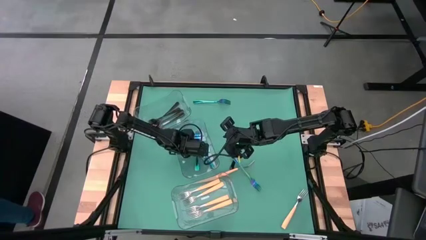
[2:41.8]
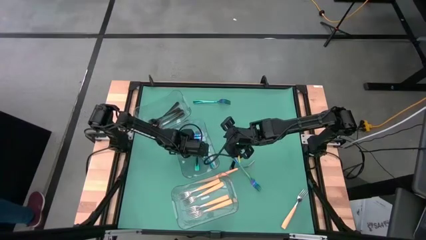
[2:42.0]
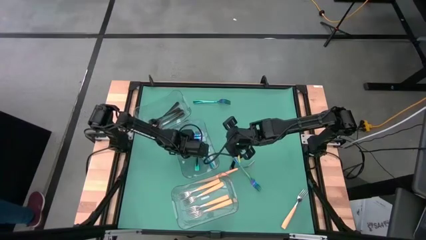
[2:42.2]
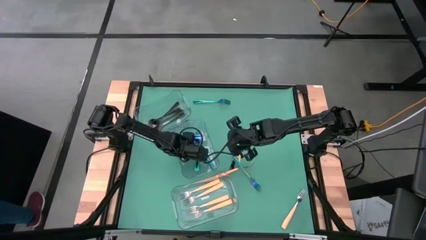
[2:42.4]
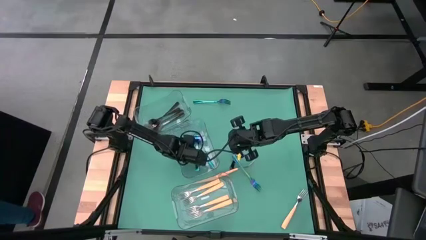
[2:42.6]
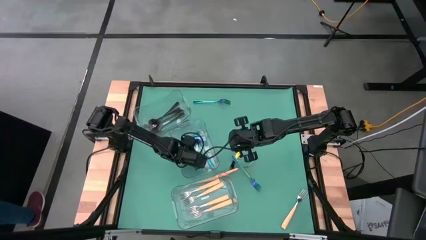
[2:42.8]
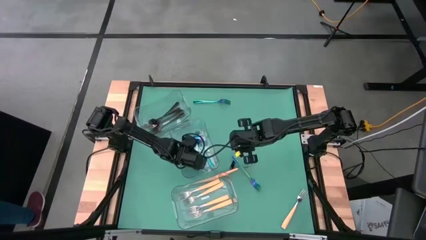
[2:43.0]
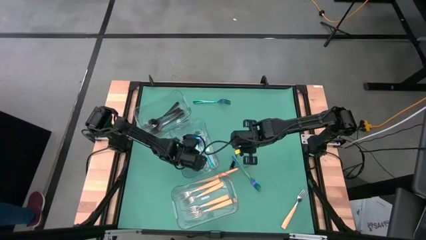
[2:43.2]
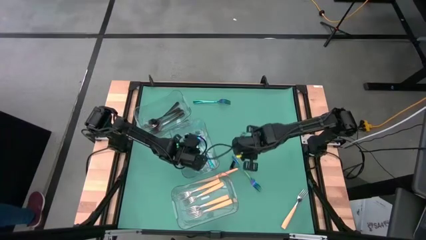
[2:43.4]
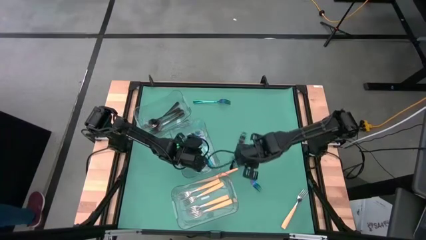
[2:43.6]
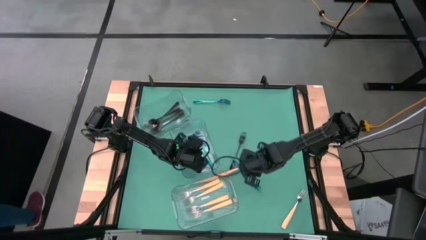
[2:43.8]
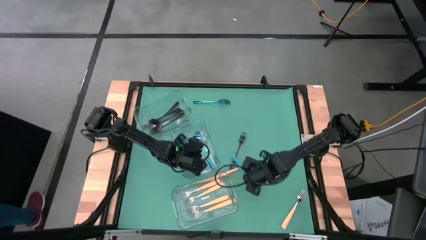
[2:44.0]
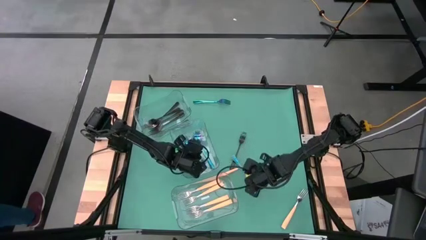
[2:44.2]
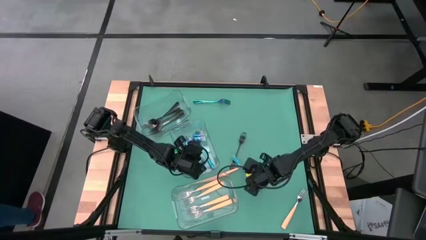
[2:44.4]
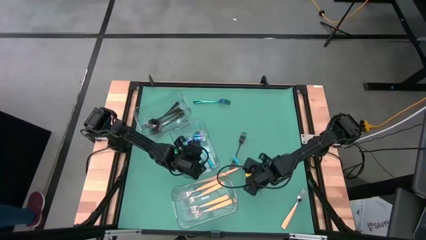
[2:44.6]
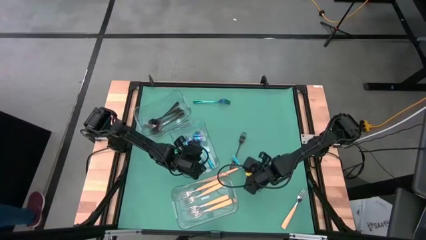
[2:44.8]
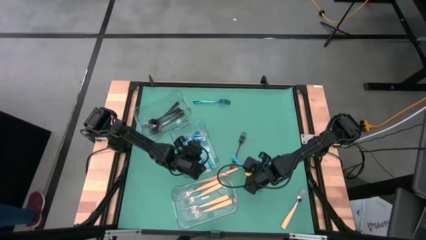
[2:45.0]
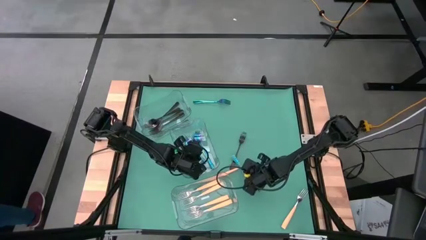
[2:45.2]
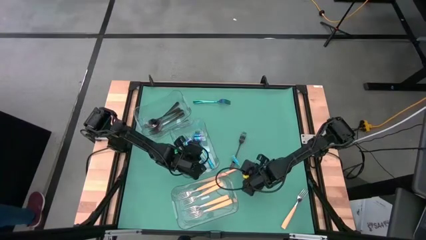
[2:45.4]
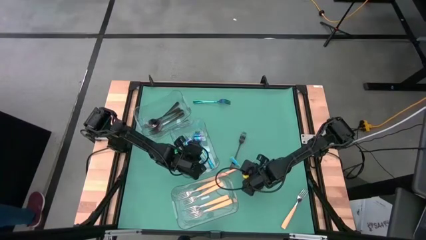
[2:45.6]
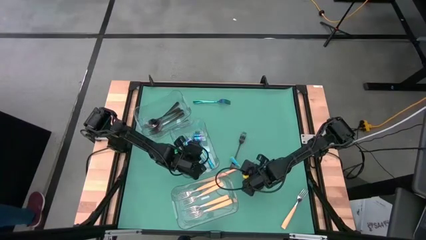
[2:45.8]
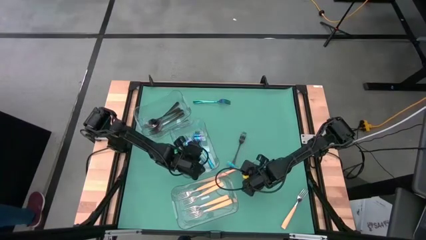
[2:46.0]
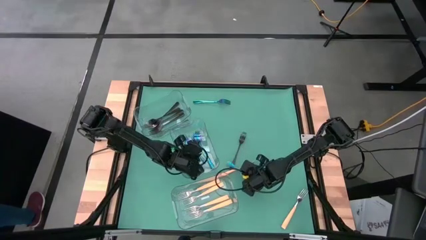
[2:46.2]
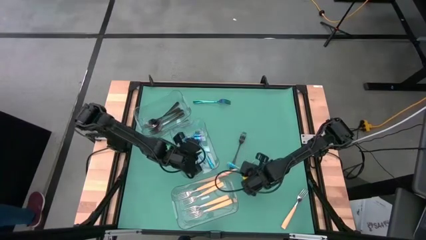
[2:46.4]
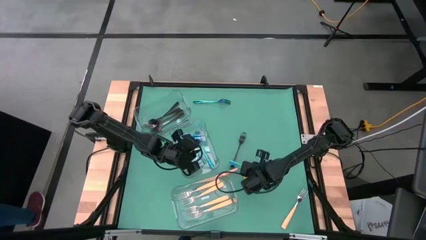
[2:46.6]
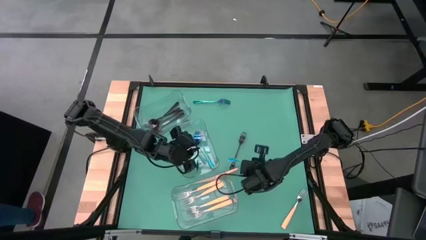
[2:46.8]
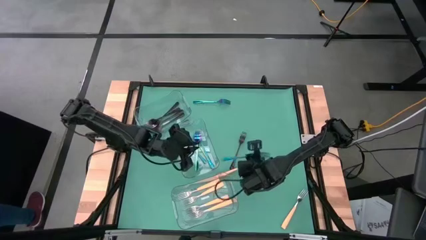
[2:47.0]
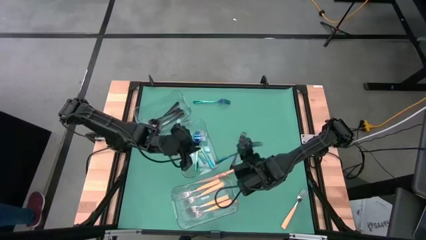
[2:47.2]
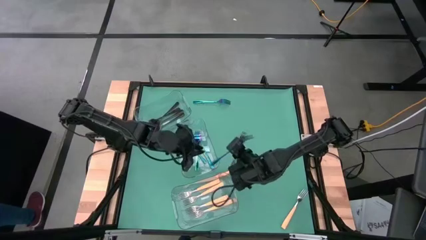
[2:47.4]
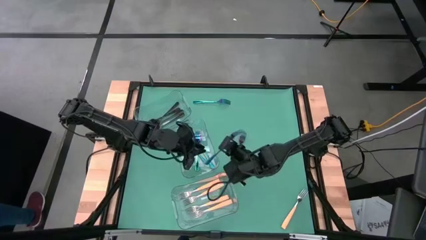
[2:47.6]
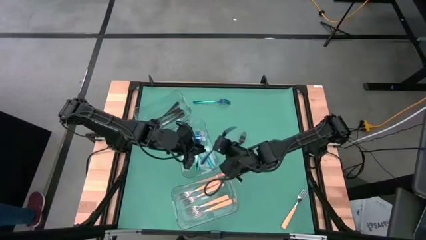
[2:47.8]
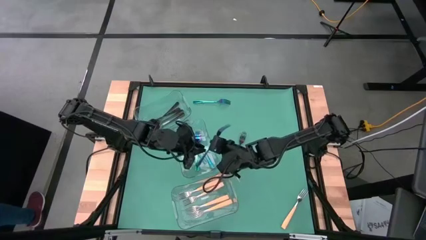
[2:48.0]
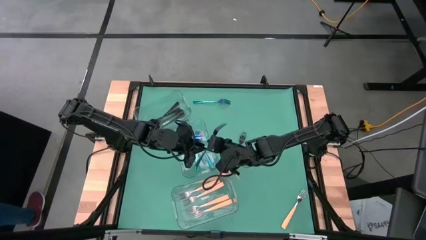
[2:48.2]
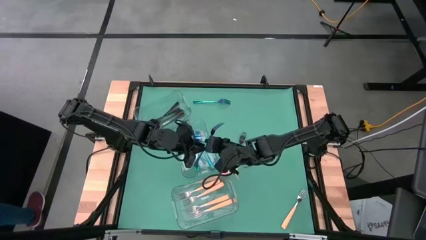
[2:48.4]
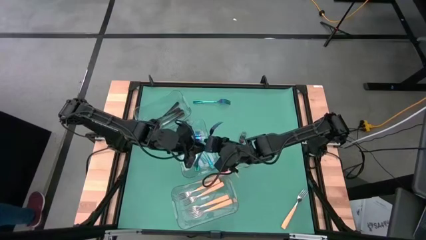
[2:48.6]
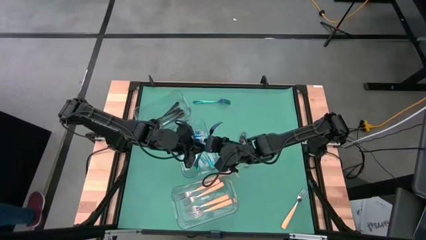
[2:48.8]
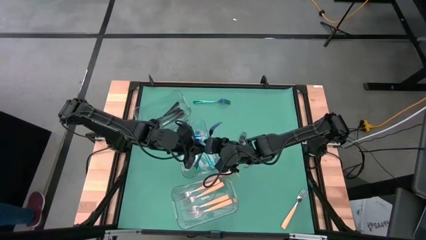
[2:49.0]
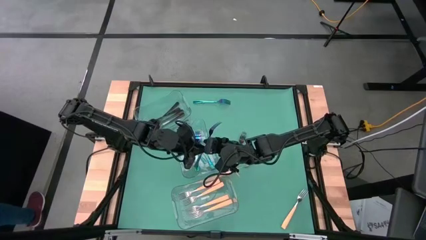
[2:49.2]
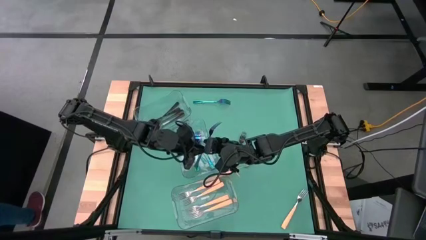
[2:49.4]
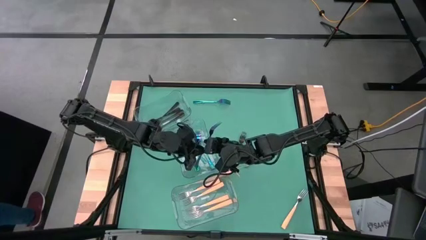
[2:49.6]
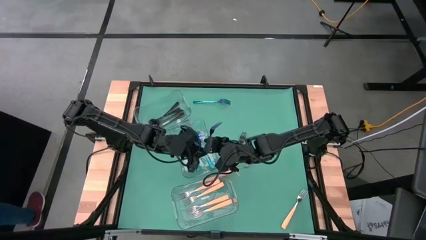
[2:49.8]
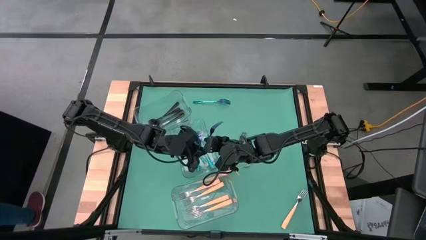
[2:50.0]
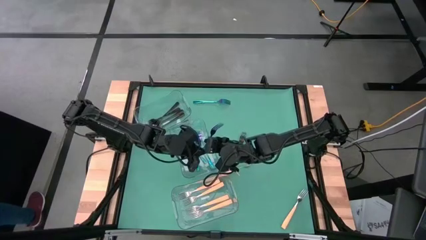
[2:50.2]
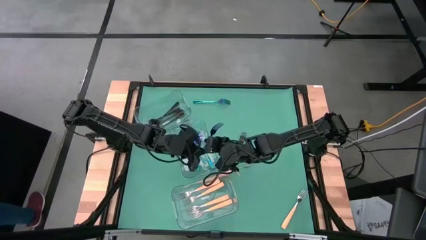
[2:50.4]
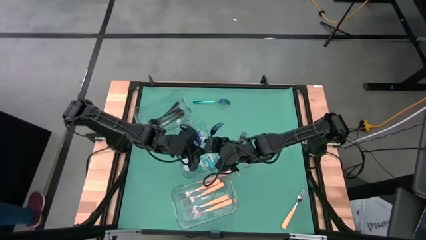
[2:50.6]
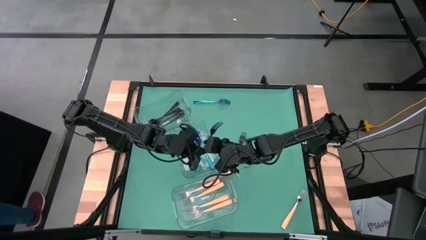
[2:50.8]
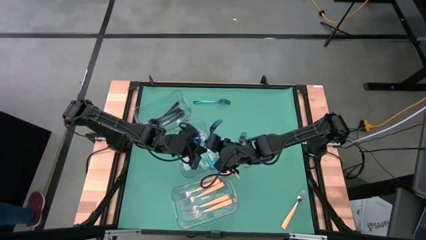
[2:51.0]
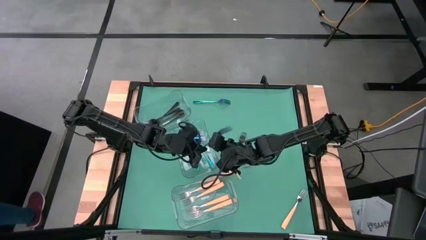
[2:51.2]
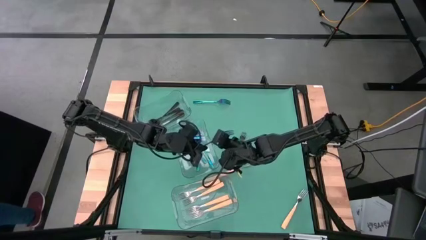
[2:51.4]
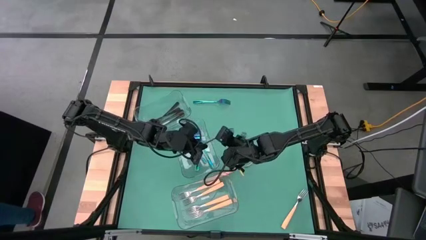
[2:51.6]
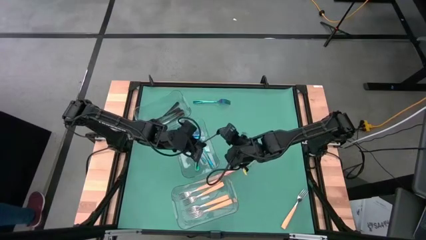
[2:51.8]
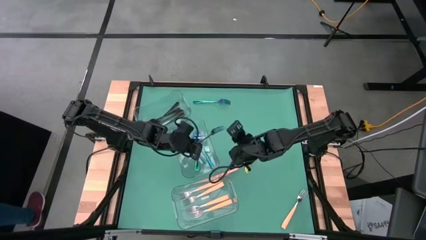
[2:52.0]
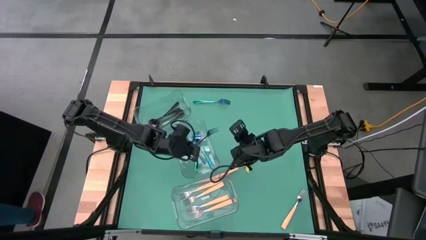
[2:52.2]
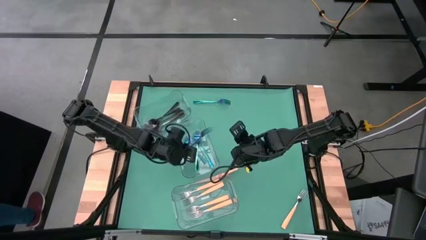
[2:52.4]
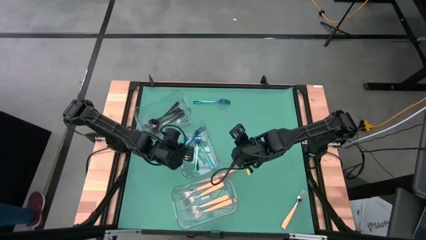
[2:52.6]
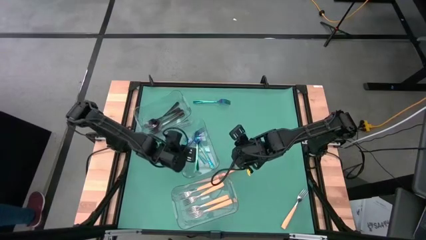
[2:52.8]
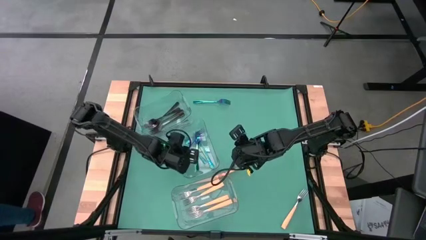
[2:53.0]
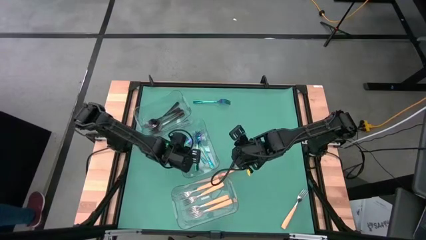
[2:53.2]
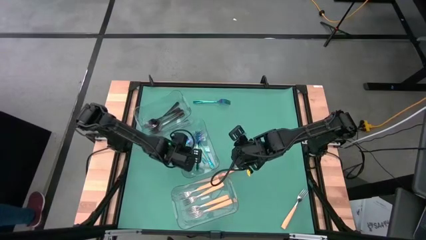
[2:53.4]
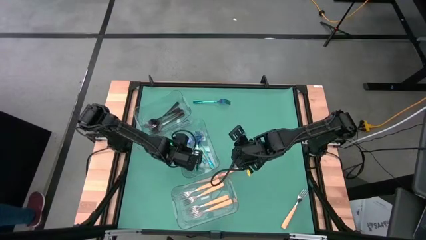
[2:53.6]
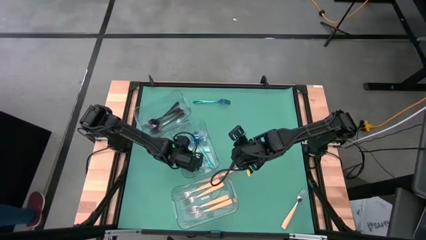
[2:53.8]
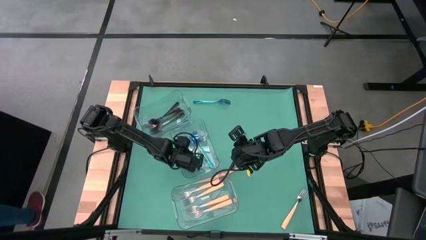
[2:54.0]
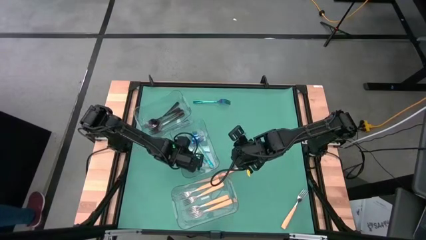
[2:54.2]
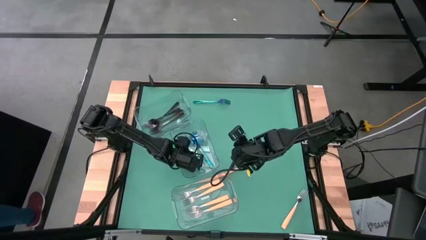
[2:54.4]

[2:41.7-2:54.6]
Task: Sort silverware by color (type)
Put the blue fork into the center transparent bin

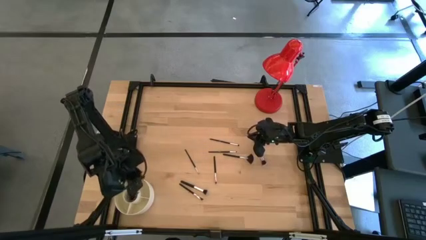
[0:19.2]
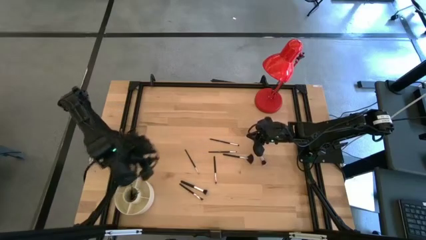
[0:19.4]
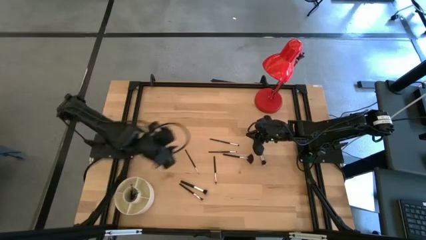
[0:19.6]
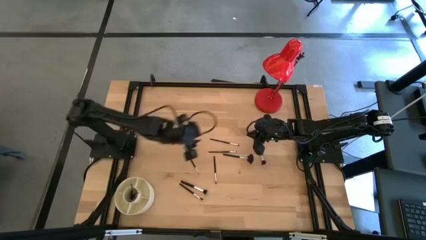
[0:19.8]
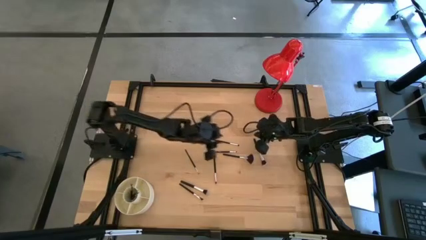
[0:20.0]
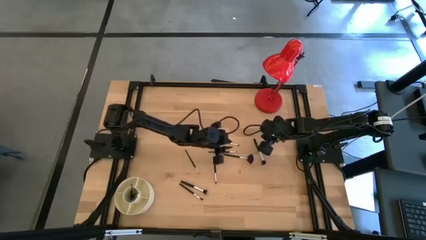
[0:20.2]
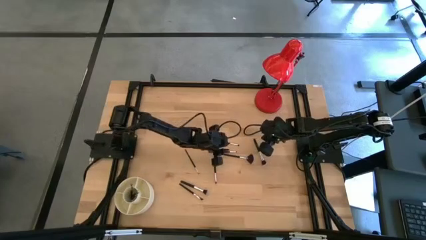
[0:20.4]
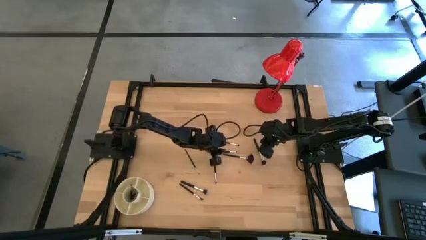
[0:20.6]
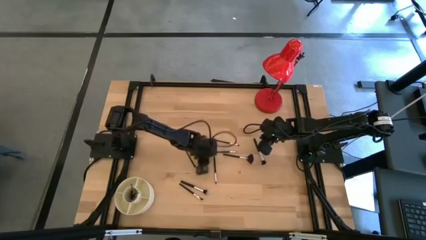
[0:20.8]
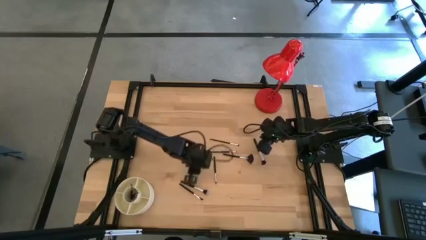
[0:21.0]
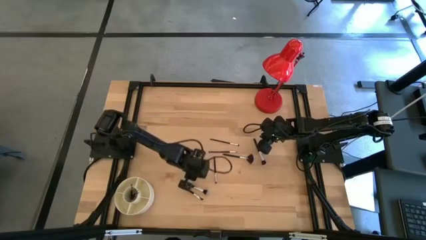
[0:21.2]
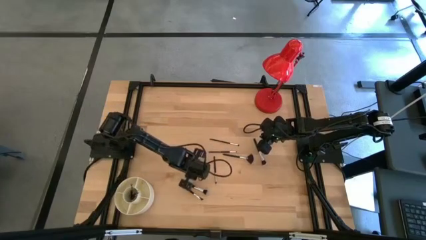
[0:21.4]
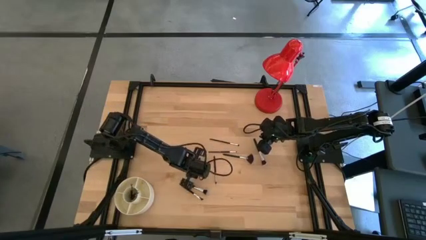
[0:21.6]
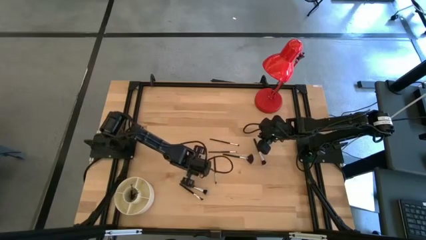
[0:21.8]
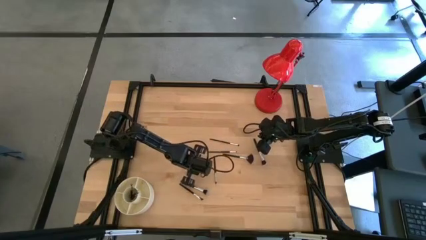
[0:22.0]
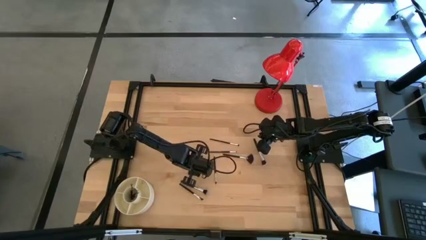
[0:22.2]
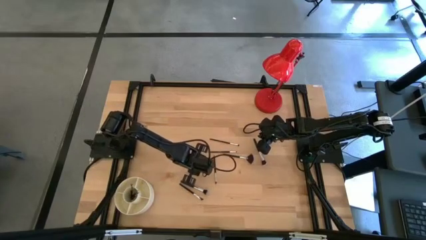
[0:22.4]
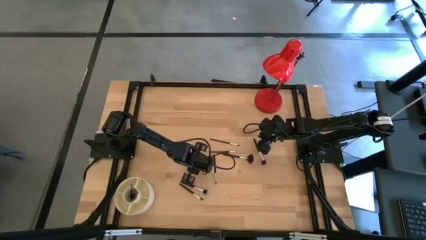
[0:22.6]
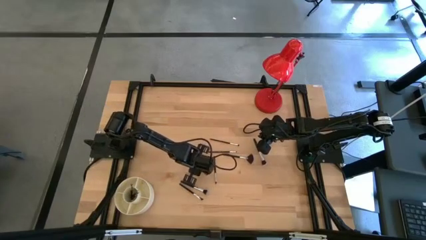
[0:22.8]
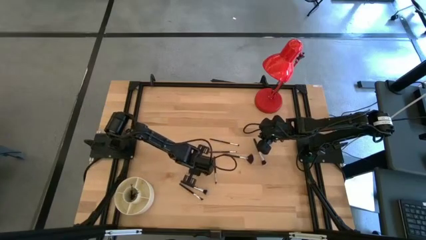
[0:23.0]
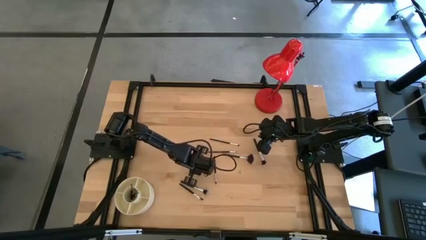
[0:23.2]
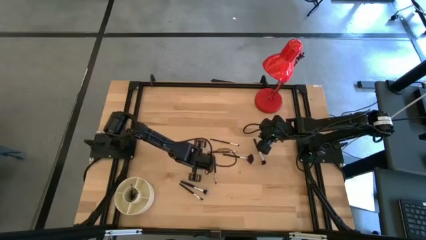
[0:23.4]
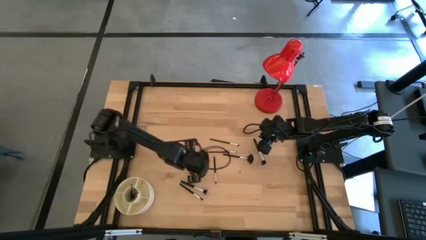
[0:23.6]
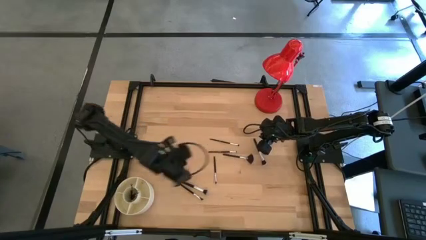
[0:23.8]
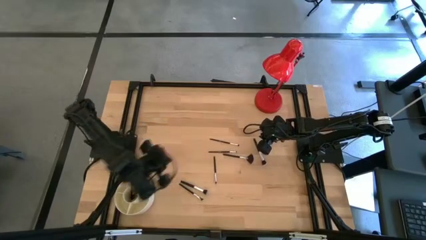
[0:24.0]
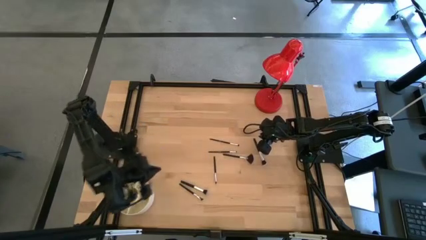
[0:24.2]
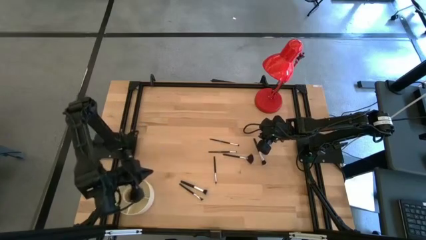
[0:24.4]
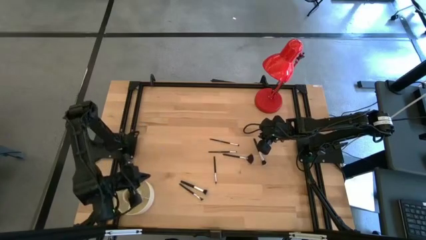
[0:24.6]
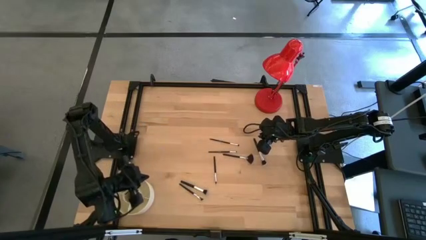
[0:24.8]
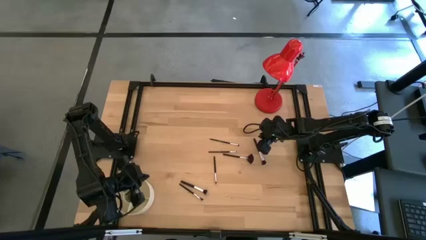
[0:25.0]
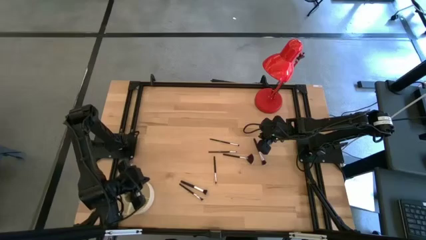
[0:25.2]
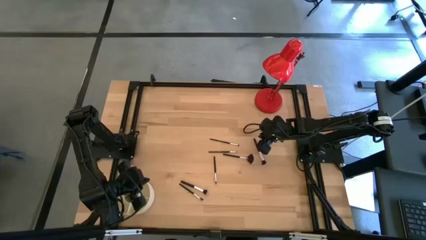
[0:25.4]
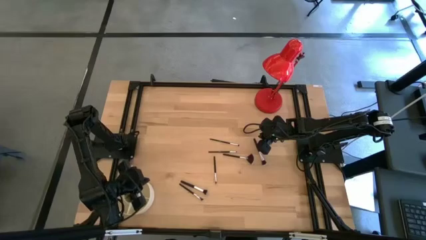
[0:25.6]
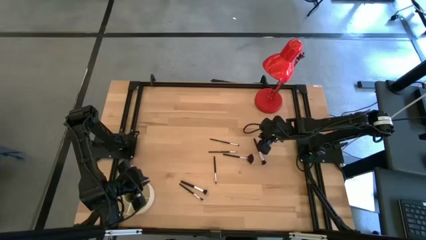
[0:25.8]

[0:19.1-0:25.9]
Task: Pick & Place Makeup Brushes
Put the black eyeshadow brush into the makeup organizer
